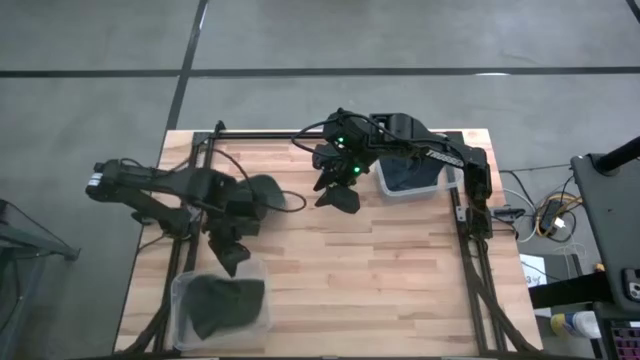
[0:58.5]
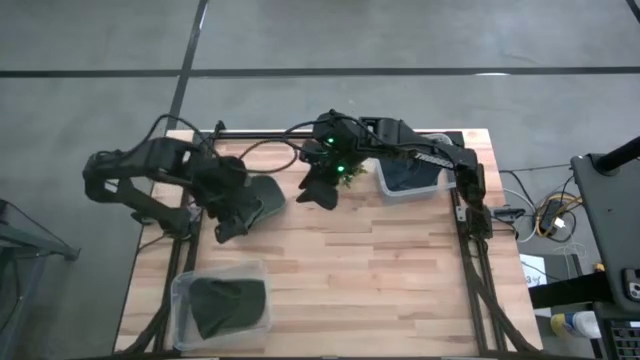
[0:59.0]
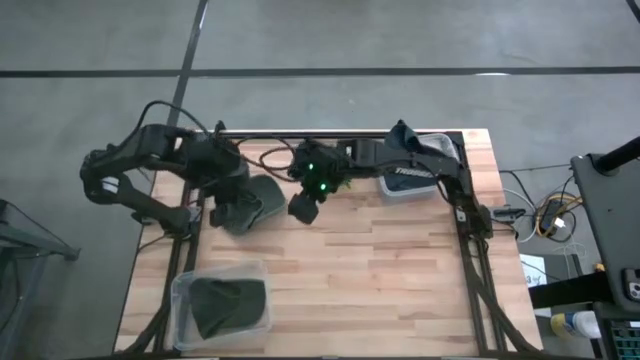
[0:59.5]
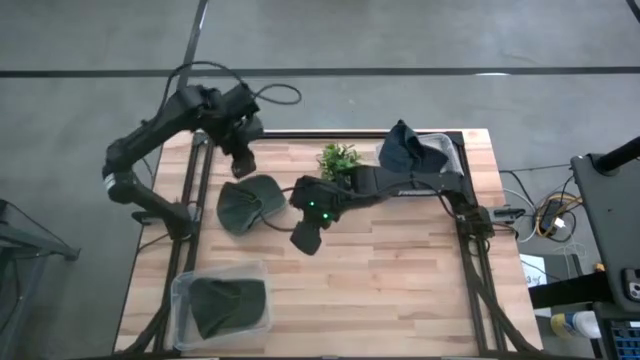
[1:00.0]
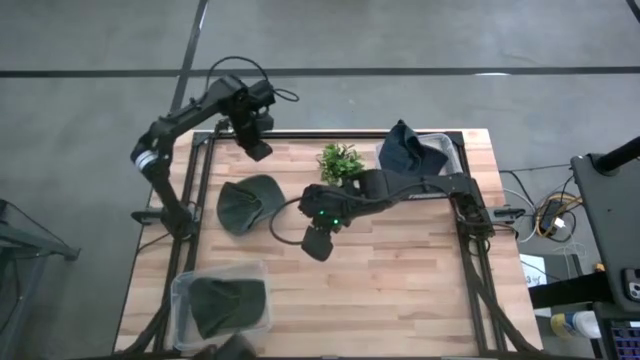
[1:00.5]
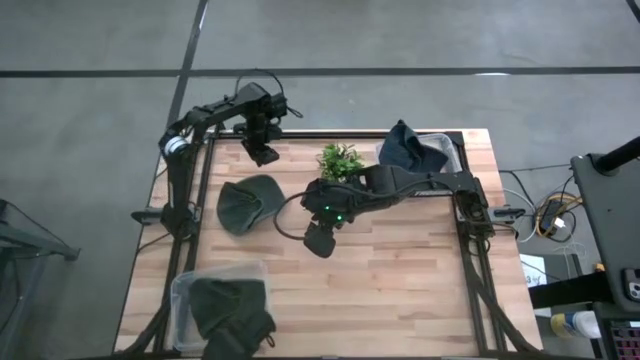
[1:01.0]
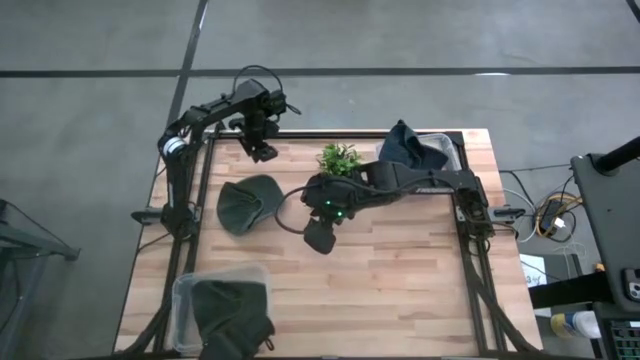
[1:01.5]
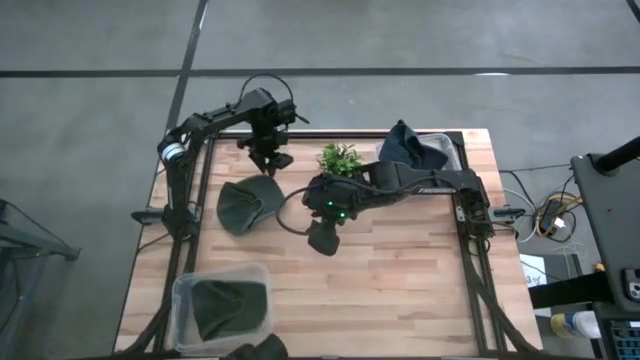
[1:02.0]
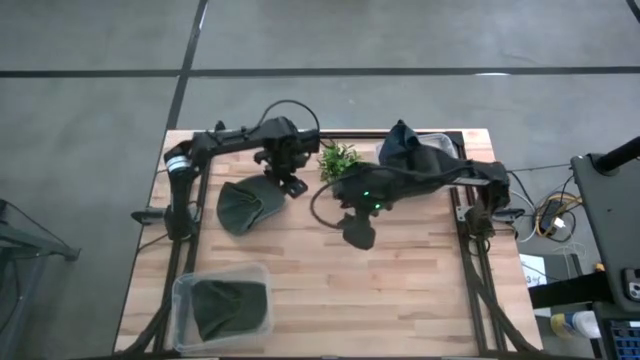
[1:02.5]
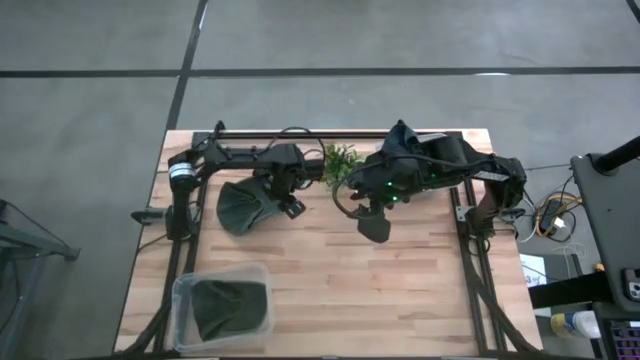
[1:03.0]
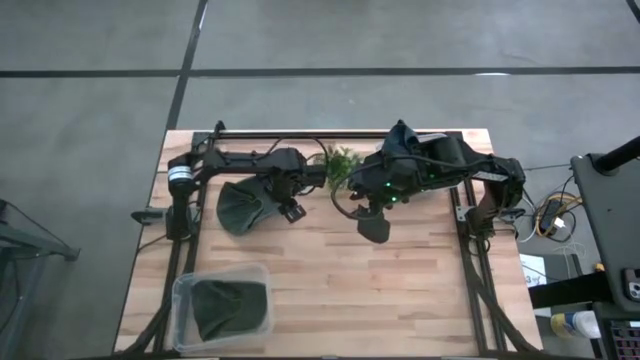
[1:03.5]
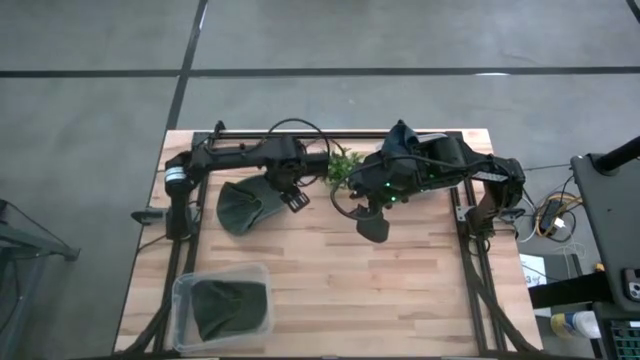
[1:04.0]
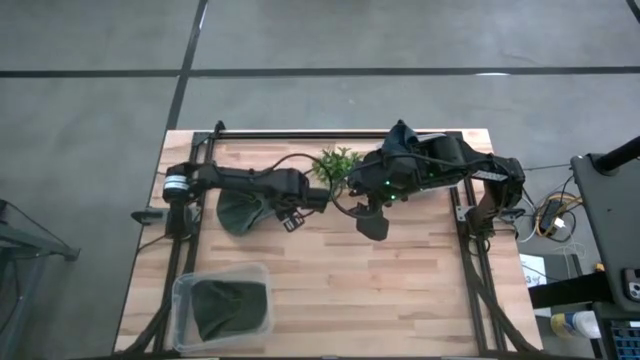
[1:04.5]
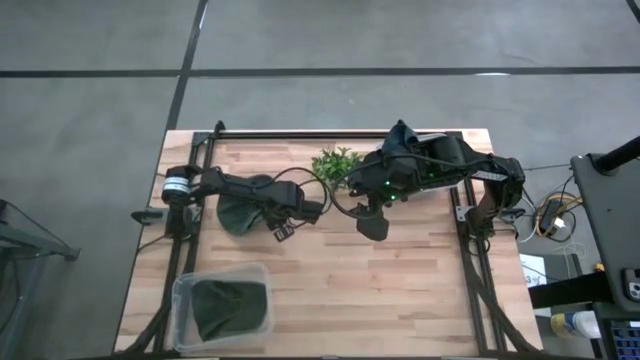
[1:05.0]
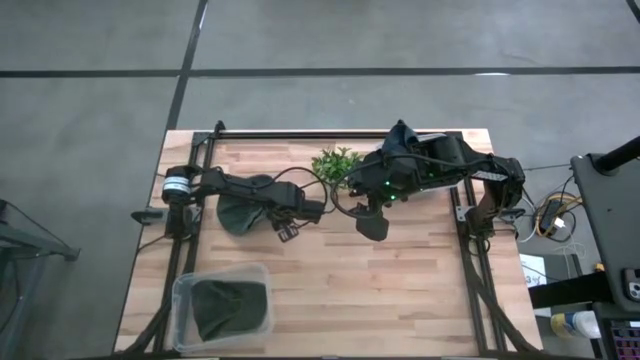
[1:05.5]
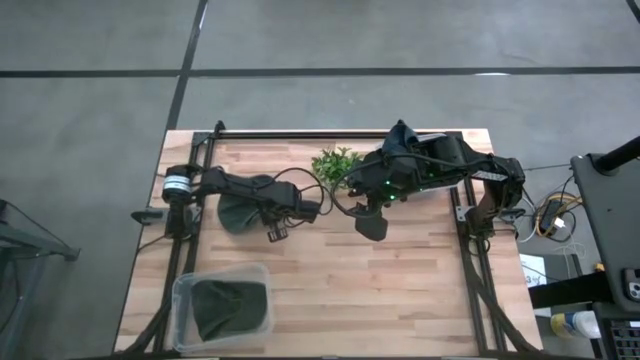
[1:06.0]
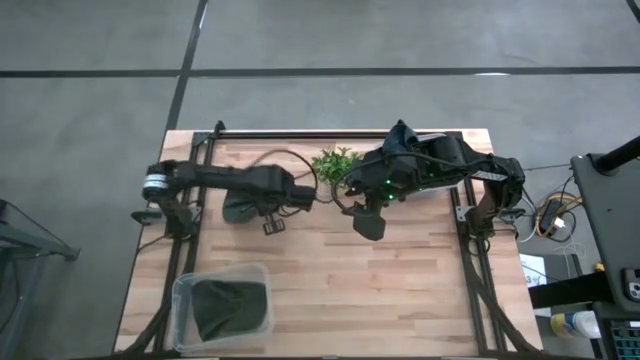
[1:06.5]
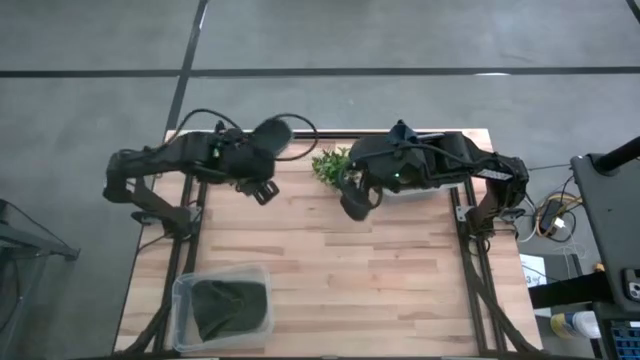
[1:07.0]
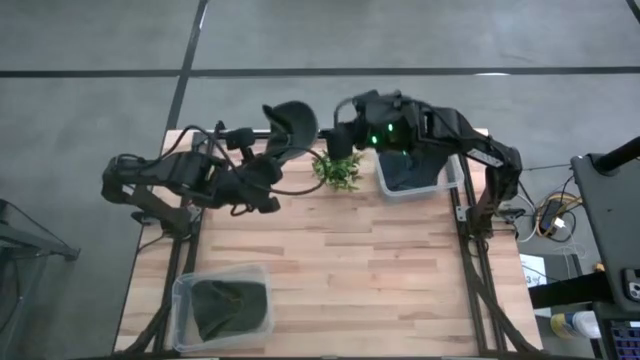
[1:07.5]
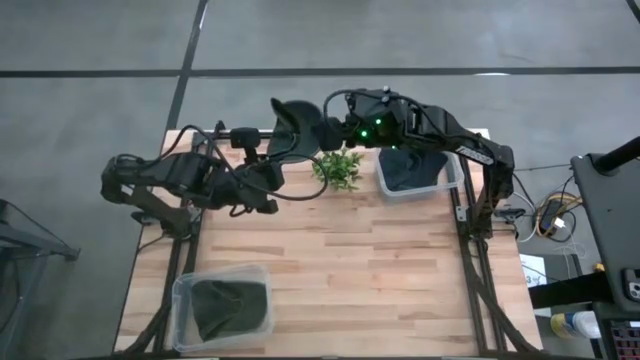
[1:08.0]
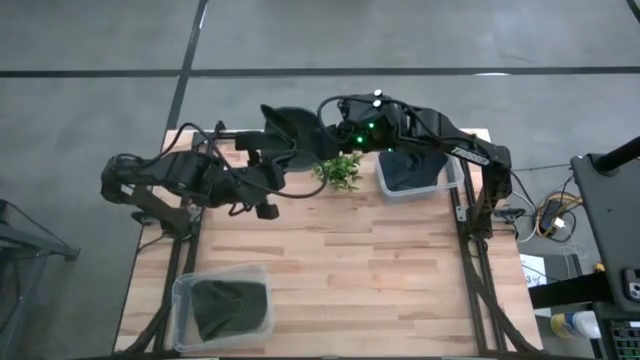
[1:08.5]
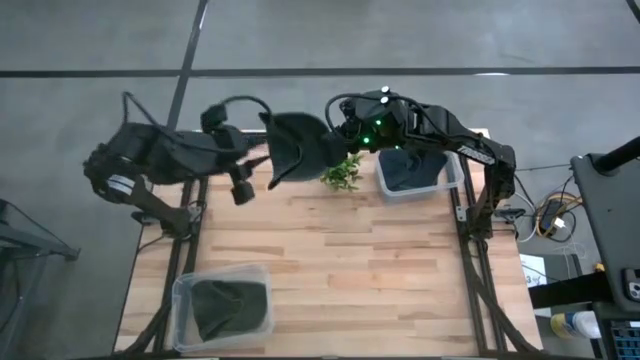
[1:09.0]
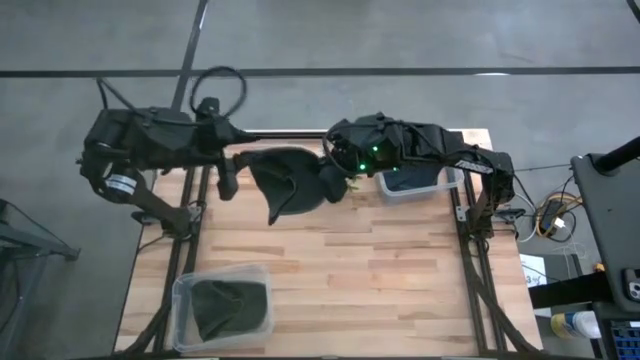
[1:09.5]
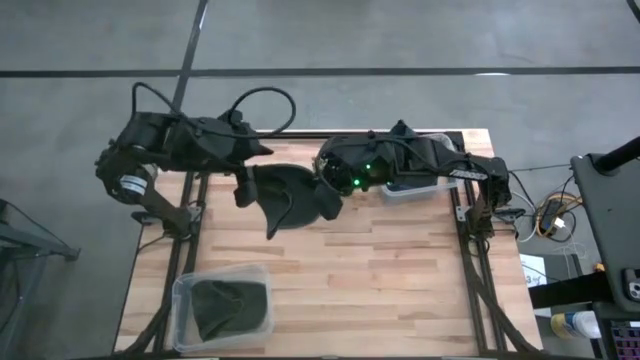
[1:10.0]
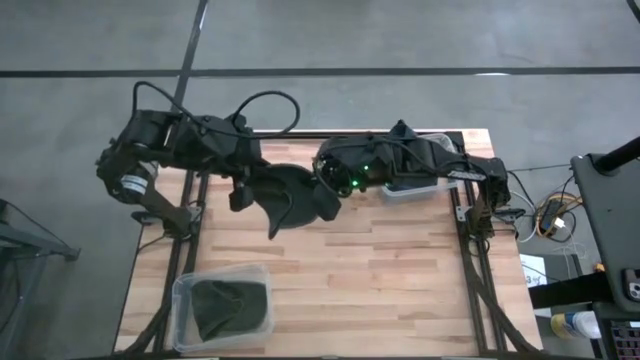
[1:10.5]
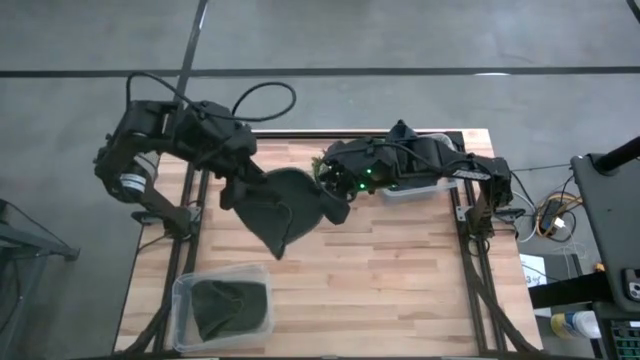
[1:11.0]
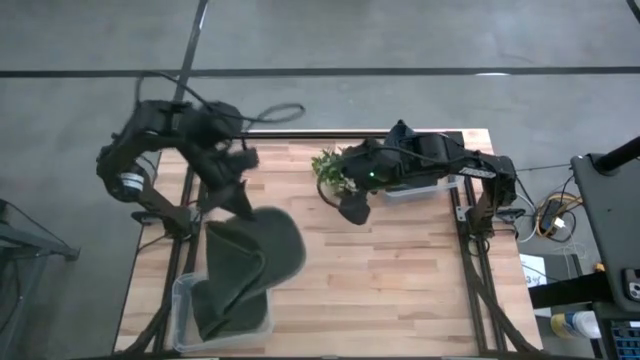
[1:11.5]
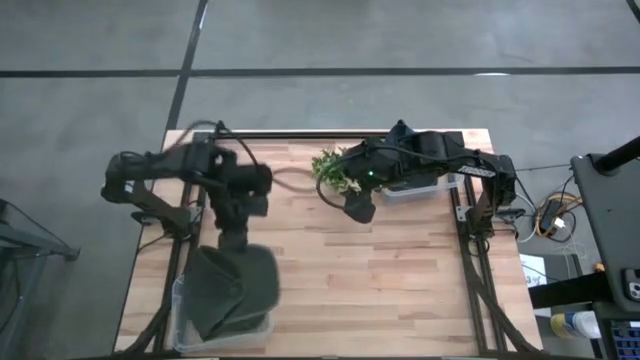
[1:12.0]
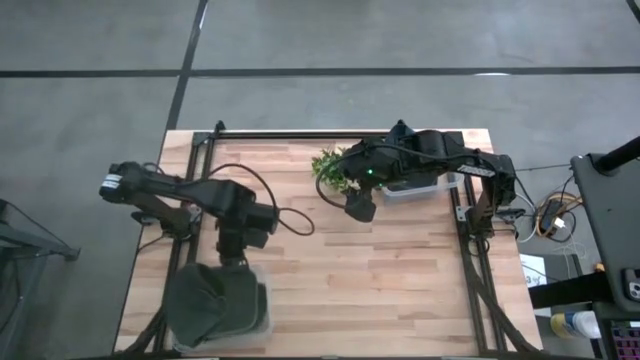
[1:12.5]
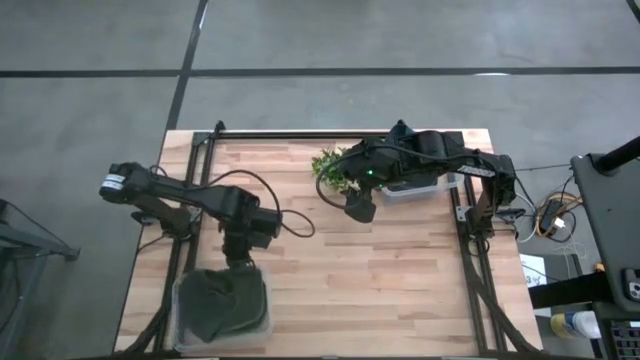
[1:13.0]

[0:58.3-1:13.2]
Task: Pick & Place hat
Put the black cap into the bottom transparent bin

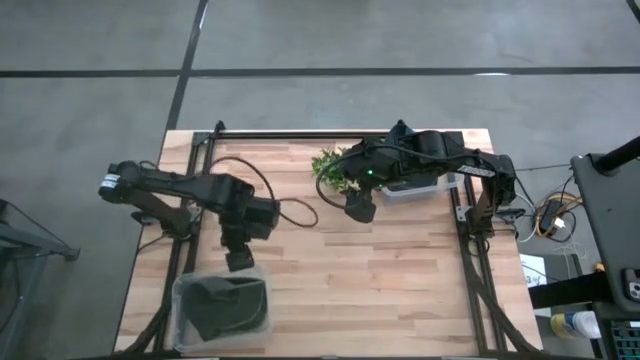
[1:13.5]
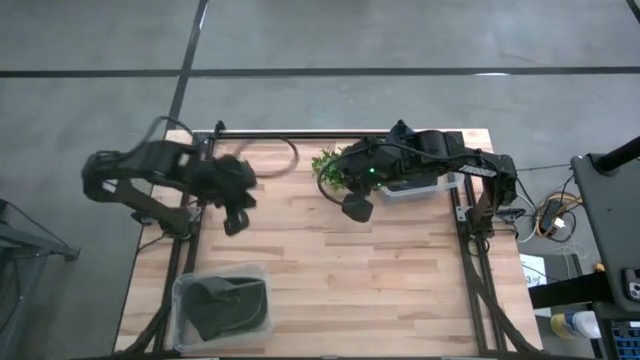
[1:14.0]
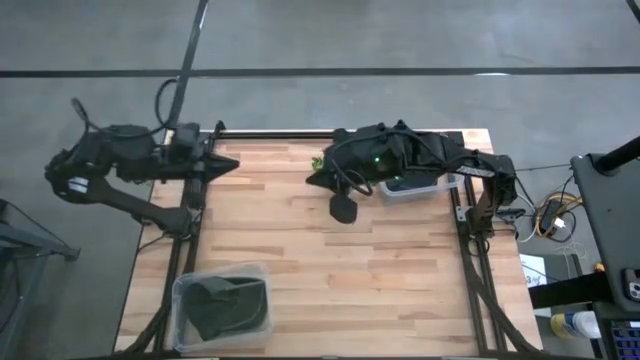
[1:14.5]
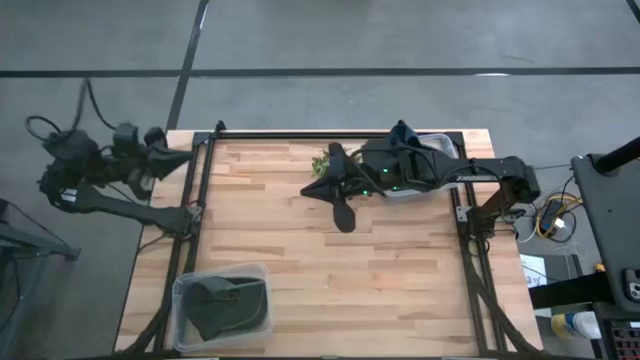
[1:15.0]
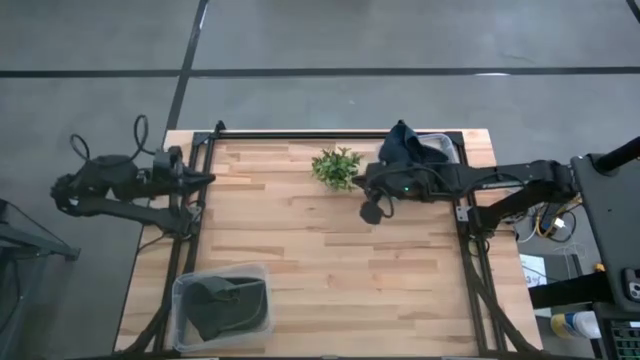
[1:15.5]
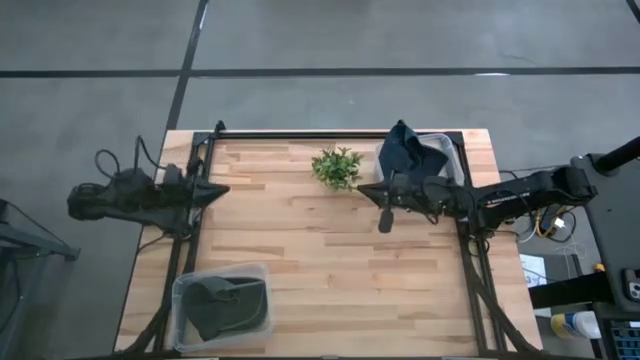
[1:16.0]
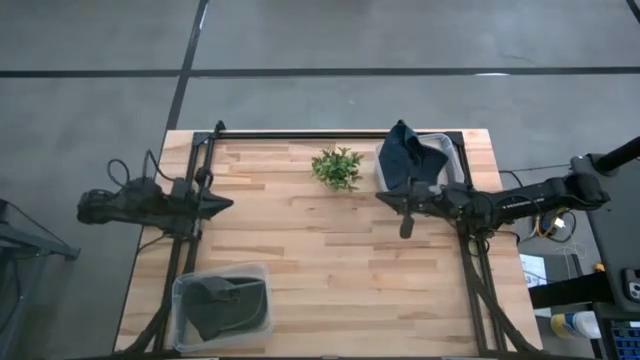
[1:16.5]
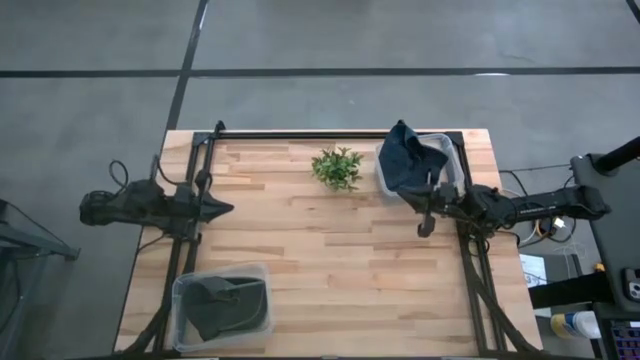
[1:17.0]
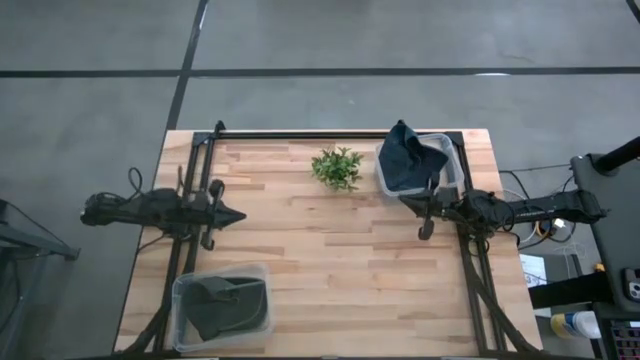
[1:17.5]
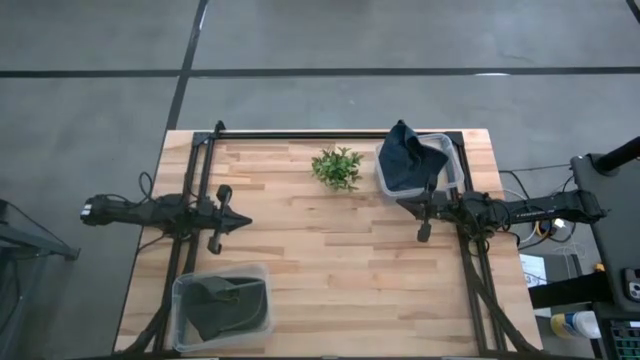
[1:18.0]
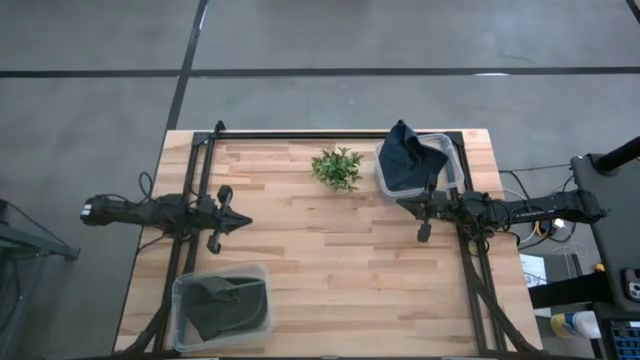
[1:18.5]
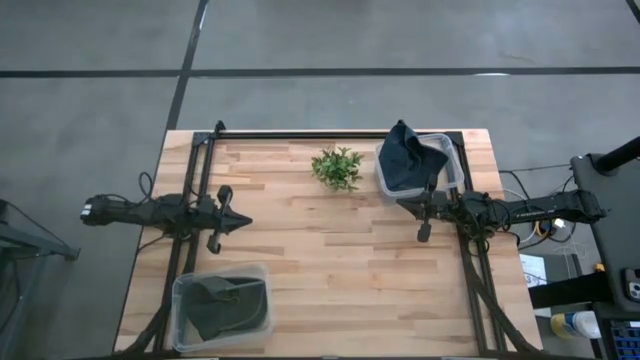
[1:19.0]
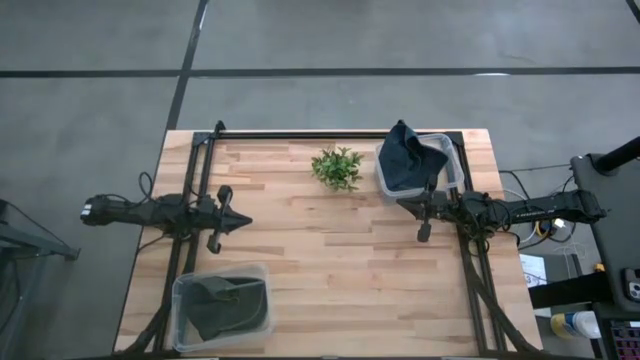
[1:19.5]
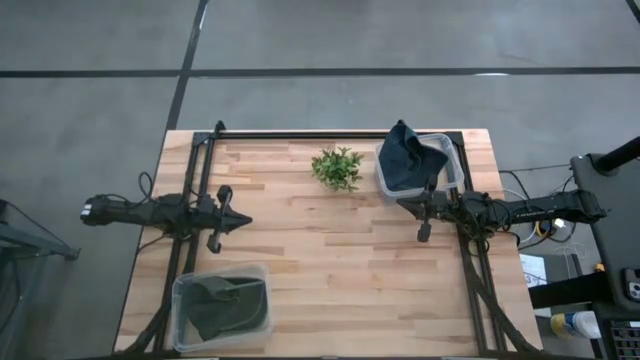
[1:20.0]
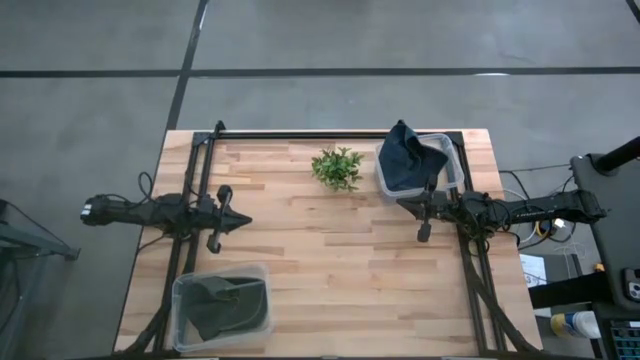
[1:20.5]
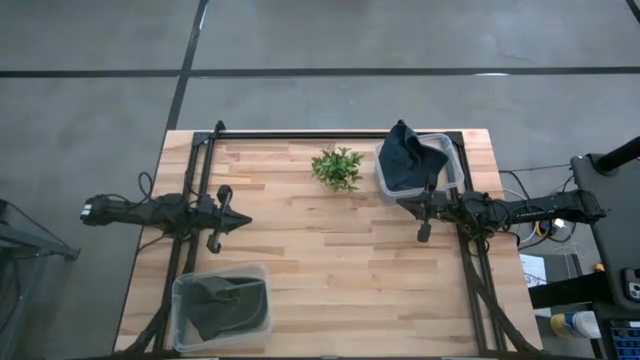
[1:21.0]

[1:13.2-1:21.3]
Return to Home Position
